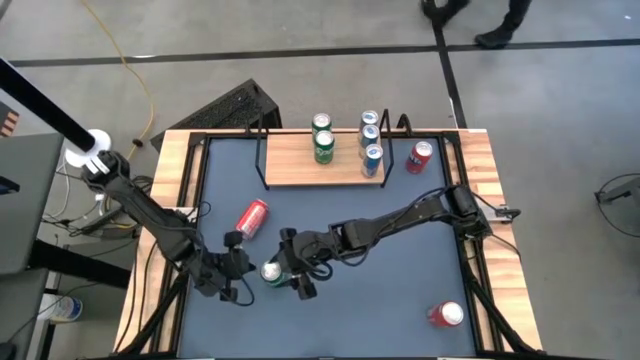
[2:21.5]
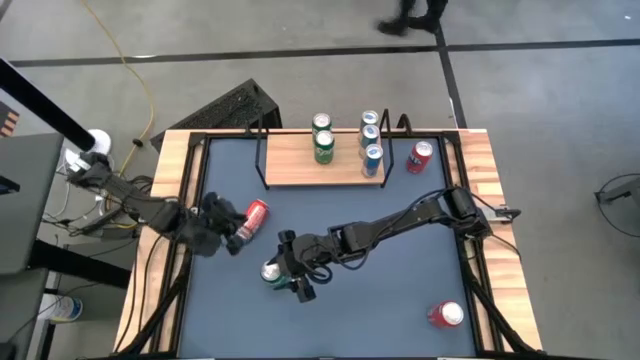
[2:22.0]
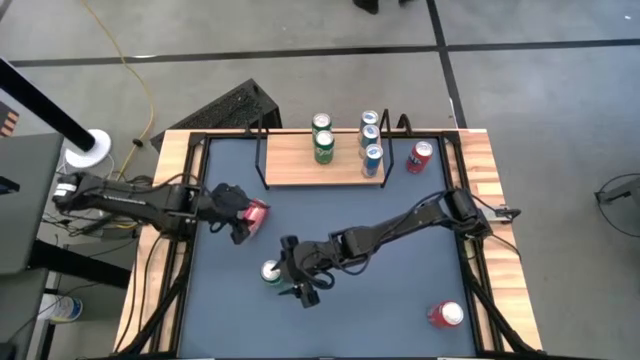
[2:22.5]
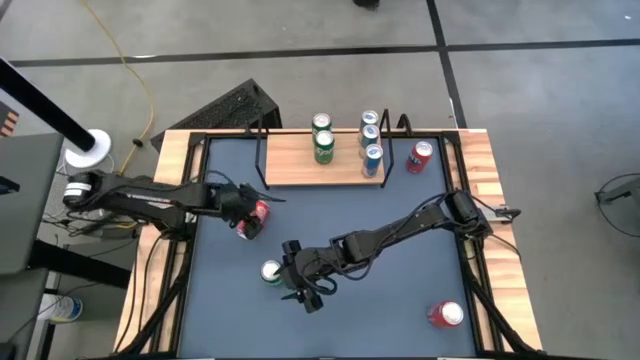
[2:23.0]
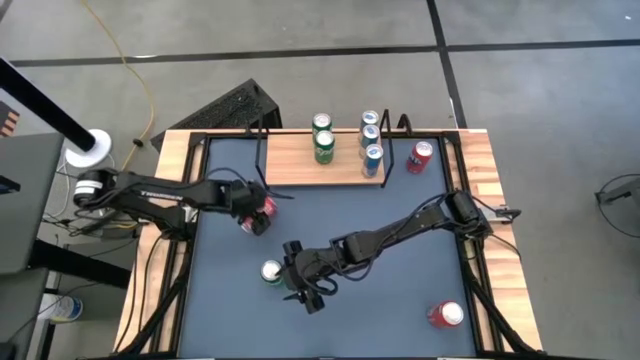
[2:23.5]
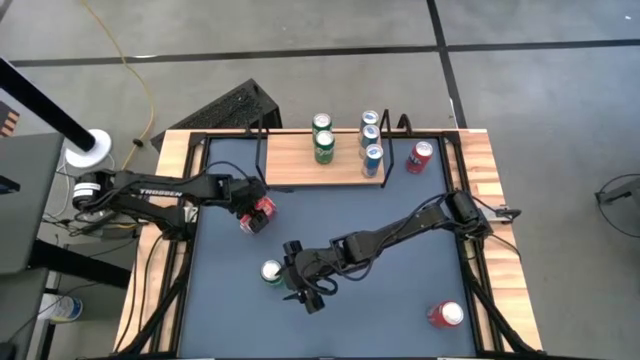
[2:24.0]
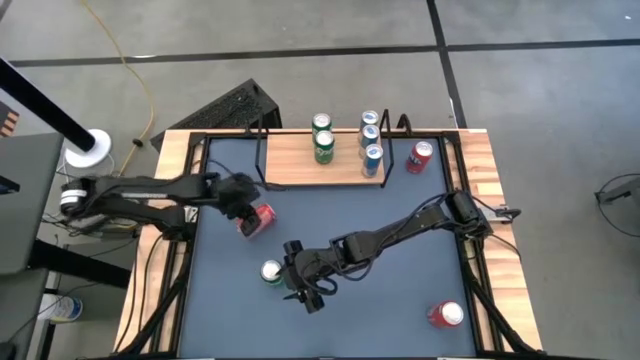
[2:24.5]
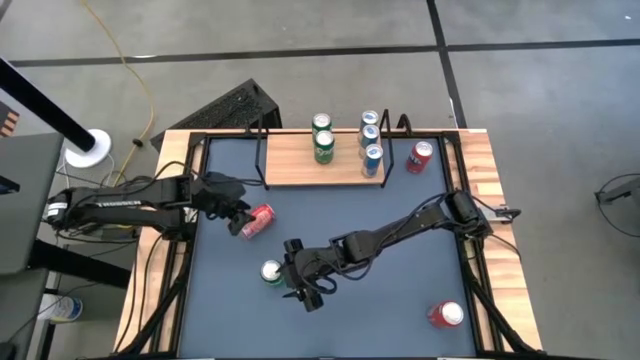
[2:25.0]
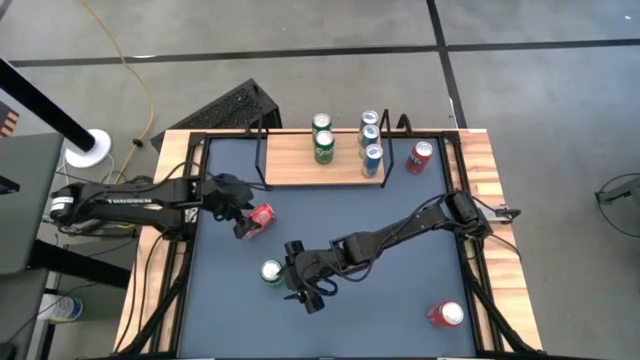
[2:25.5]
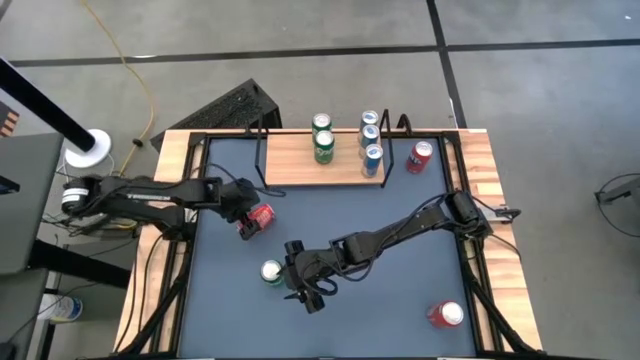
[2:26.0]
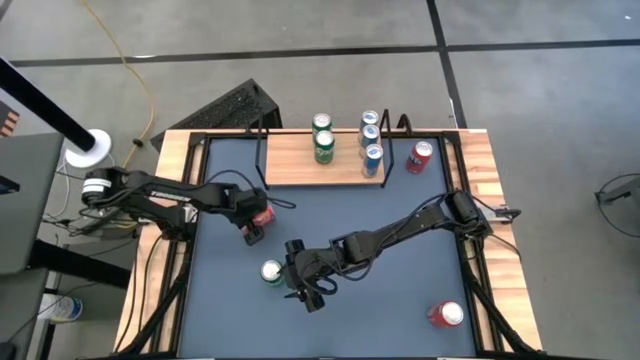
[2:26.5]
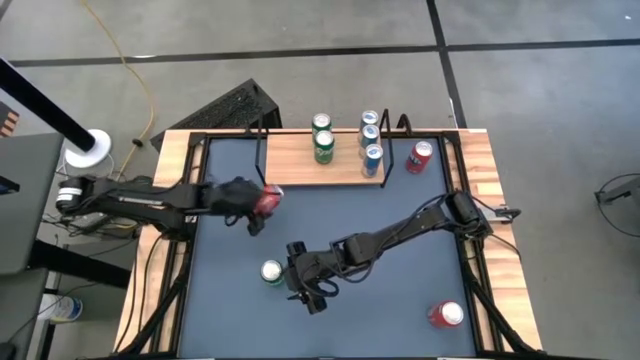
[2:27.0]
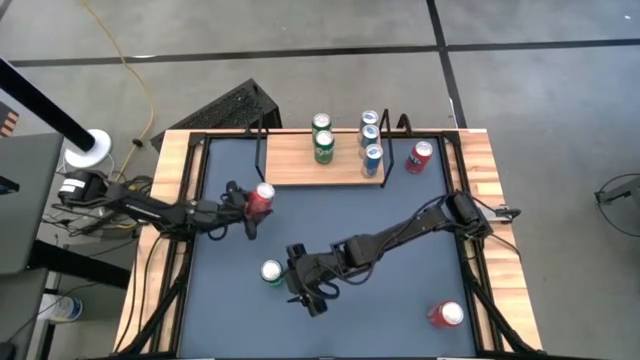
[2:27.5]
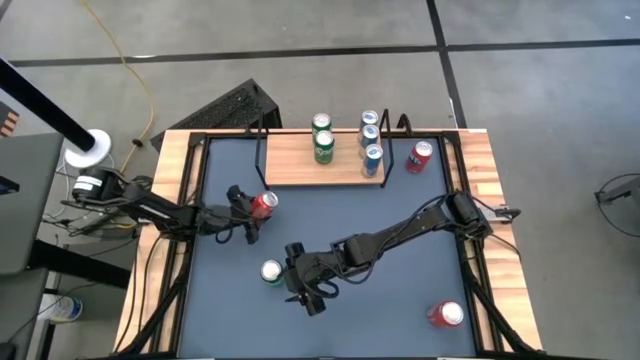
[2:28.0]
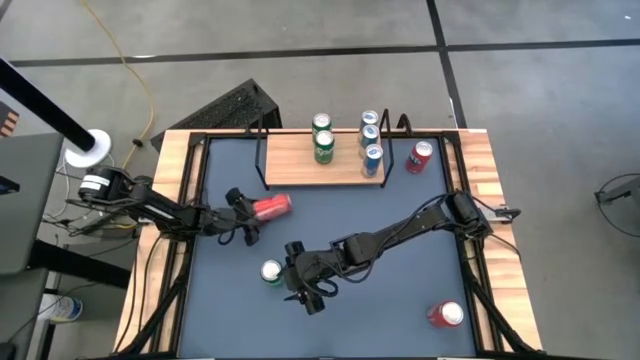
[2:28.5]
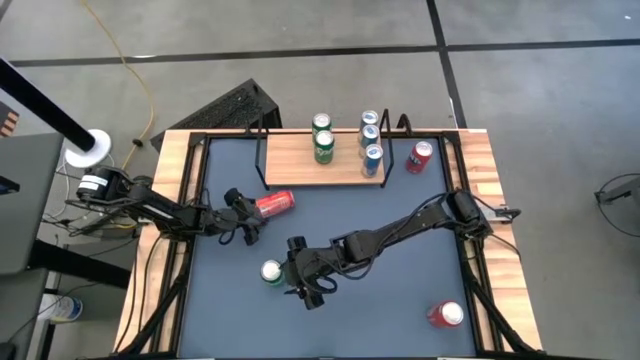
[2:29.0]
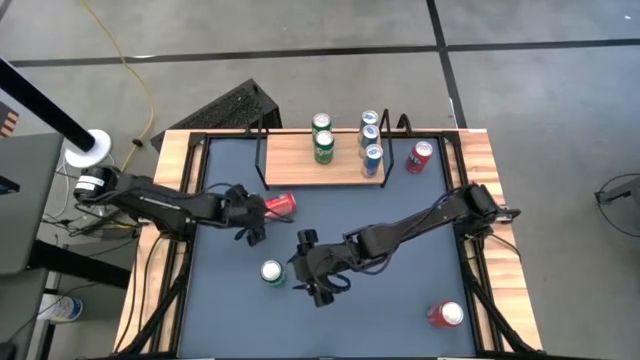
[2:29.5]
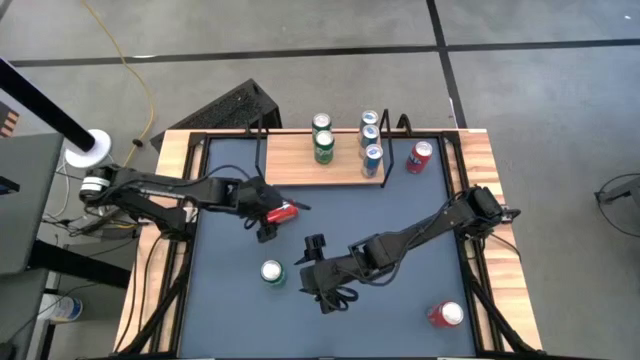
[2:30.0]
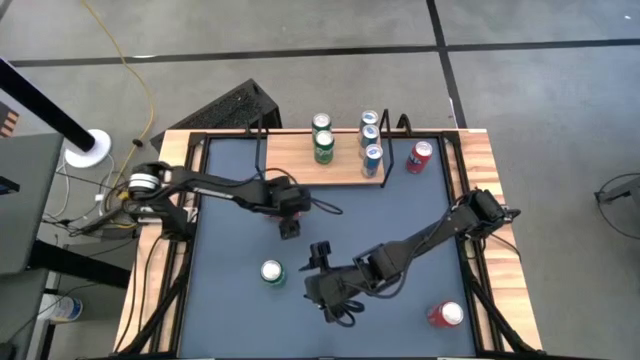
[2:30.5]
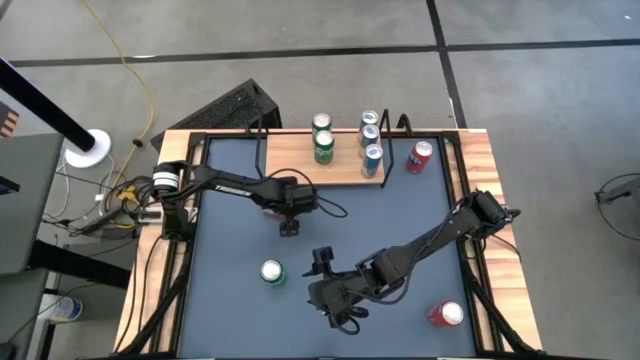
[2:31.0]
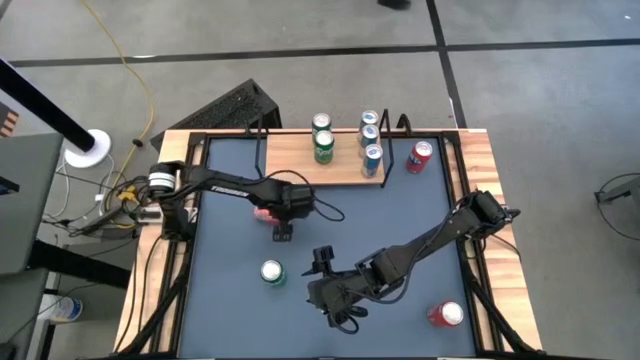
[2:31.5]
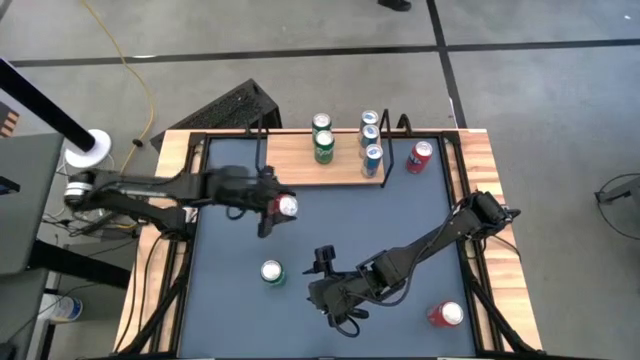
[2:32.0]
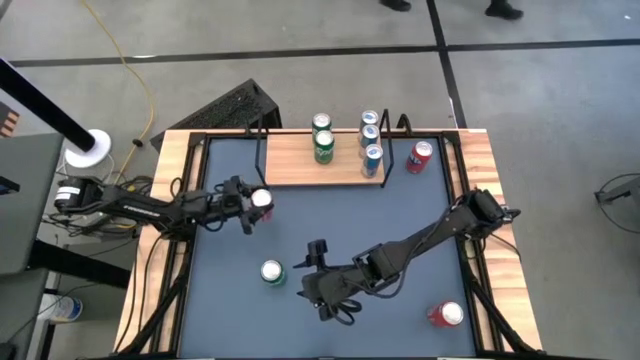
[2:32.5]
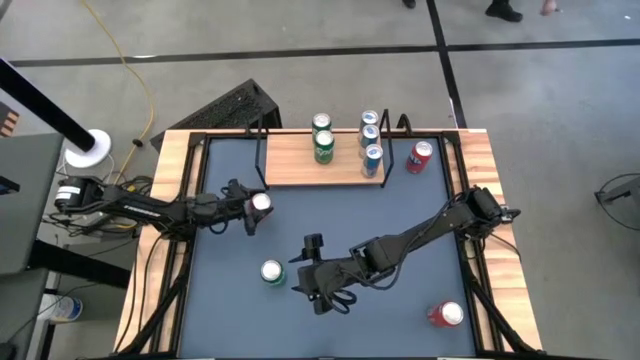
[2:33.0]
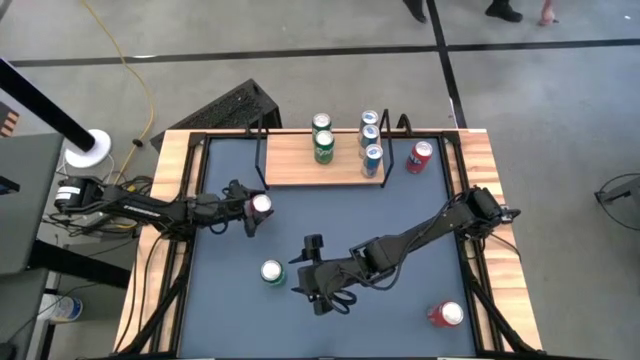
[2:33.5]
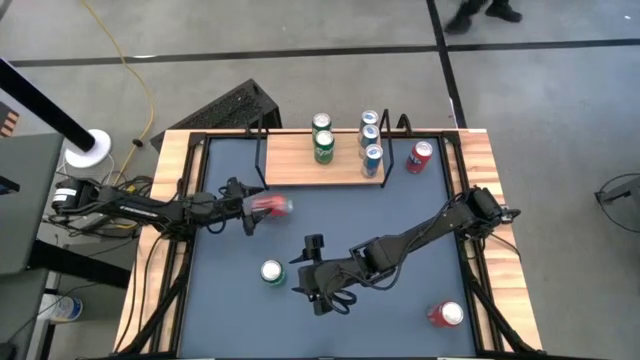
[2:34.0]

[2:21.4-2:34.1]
Task: Place canned beverage on shelf
Adjust the left red soda can

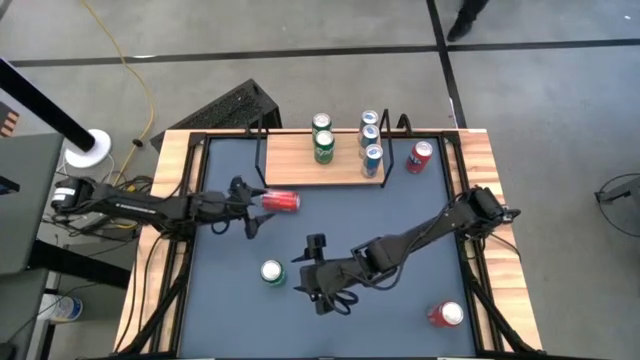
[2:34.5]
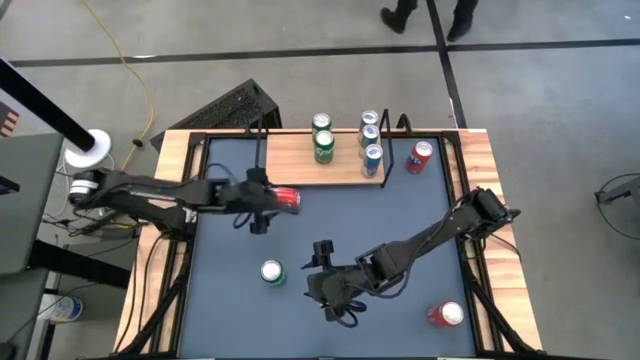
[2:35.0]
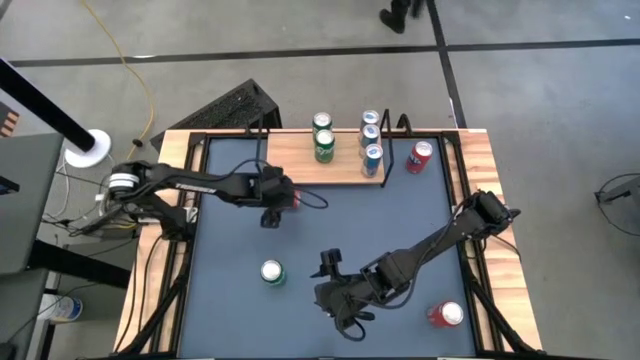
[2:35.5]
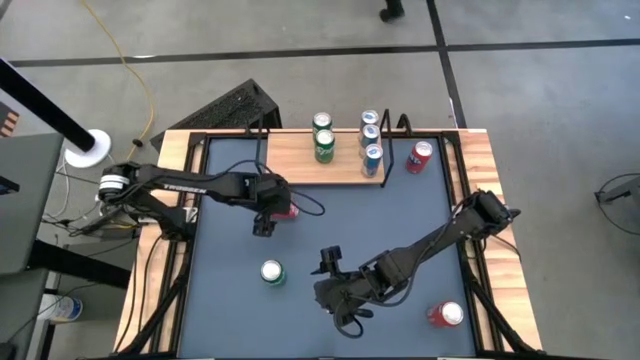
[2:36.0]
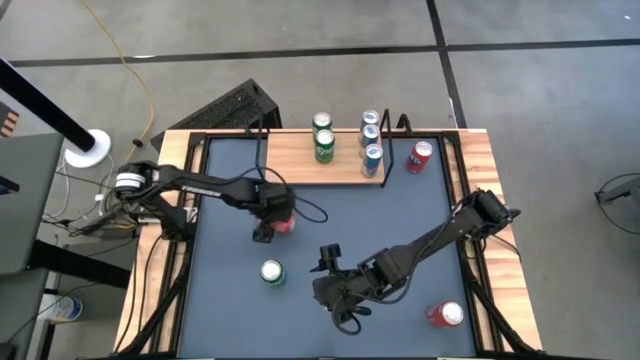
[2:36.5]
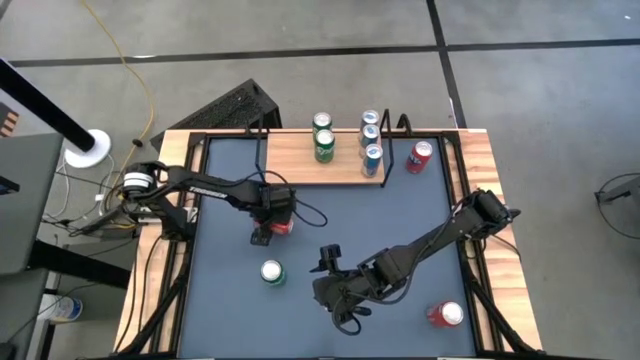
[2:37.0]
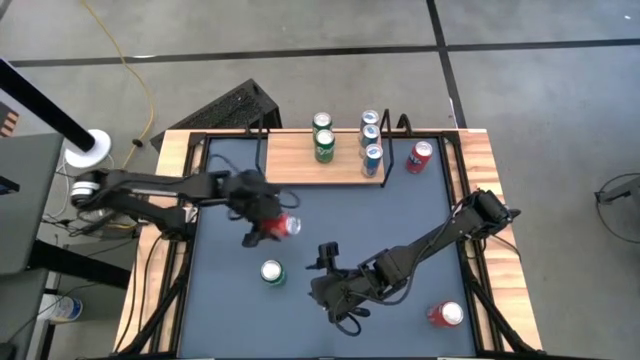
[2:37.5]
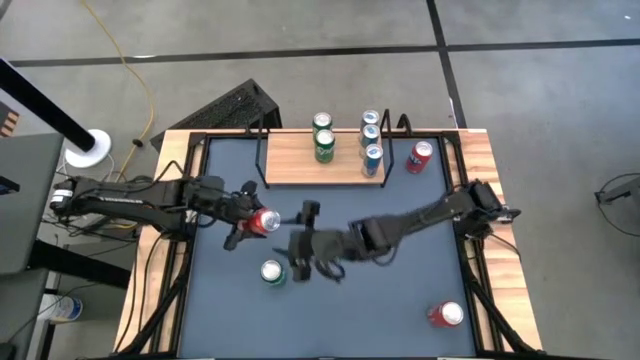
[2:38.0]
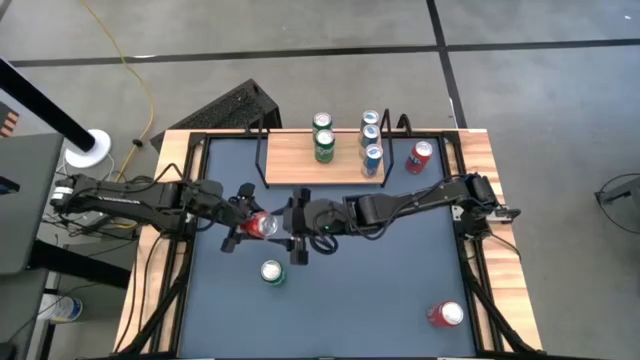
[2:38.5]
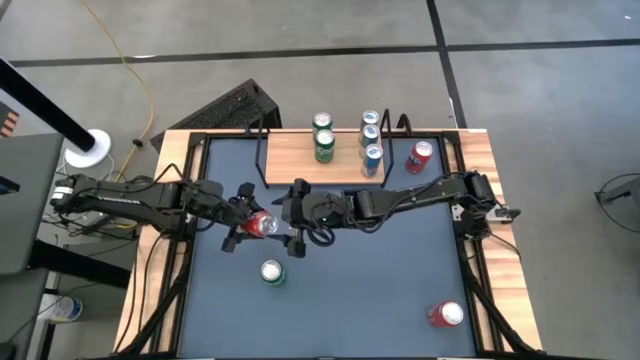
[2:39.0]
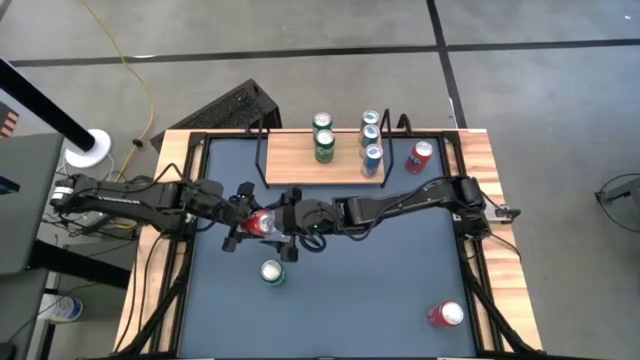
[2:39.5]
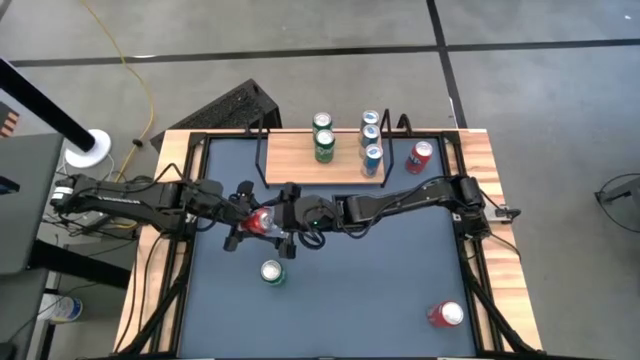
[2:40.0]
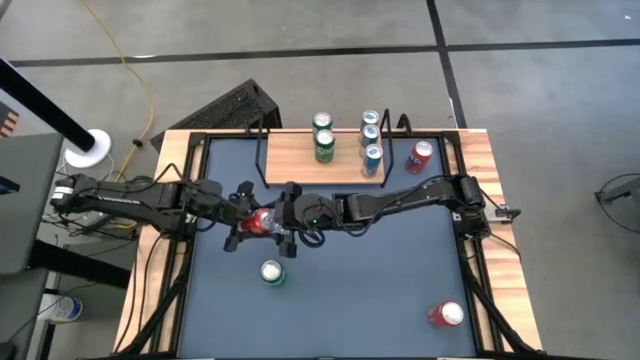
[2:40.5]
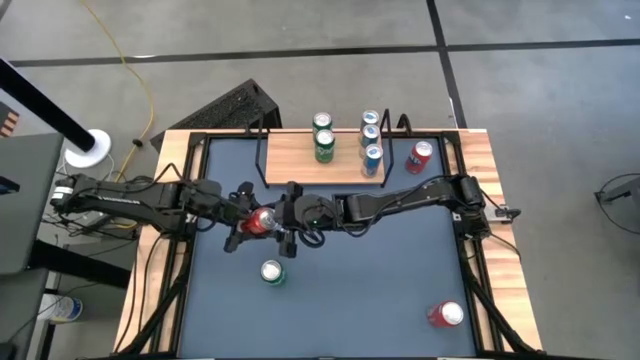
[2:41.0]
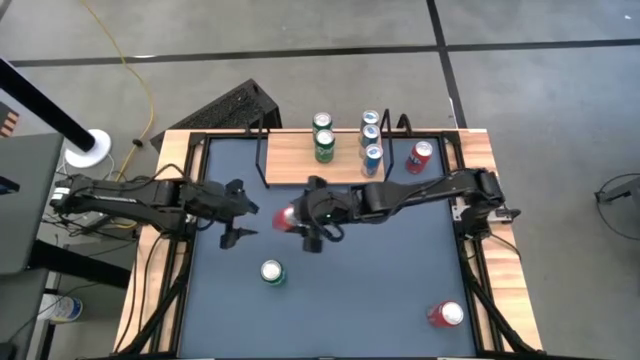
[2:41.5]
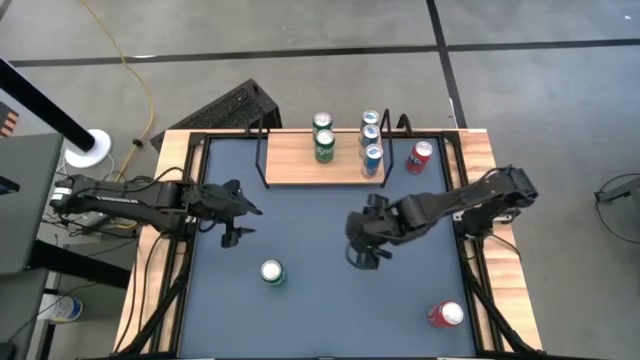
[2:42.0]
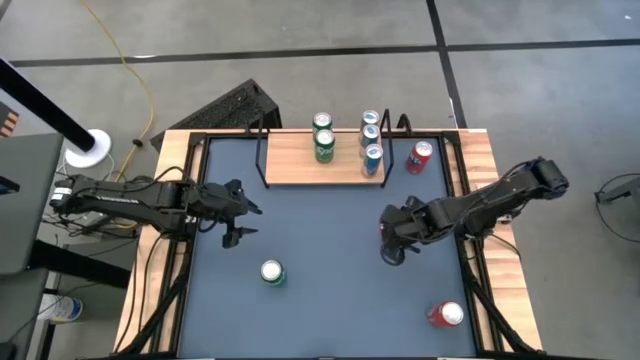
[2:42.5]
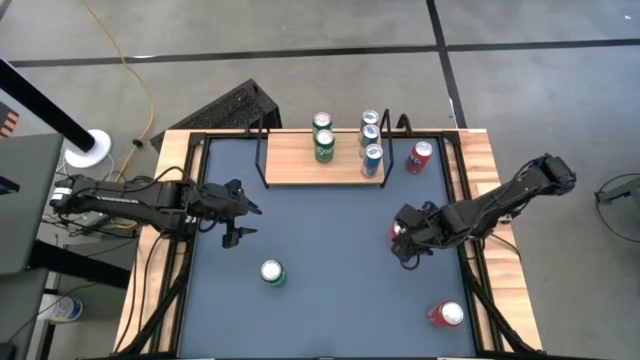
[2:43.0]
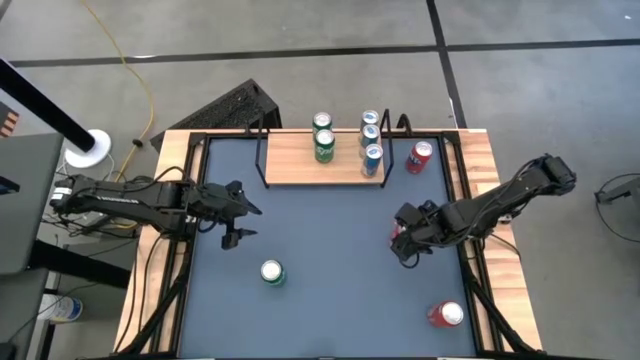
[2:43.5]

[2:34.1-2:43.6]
Adjust the left red soda can
